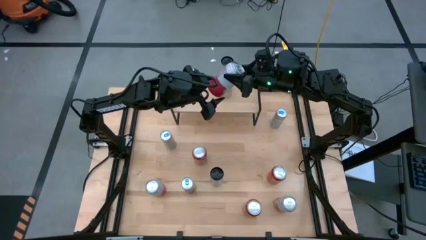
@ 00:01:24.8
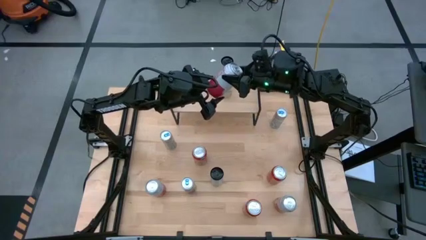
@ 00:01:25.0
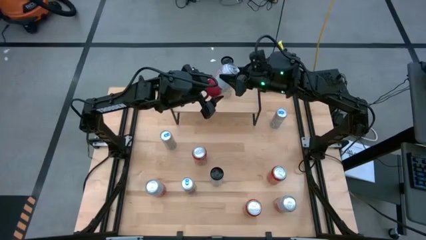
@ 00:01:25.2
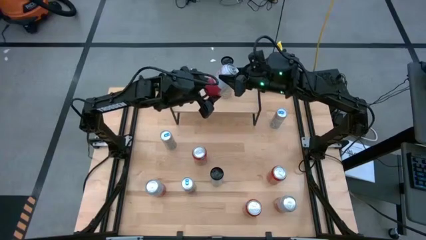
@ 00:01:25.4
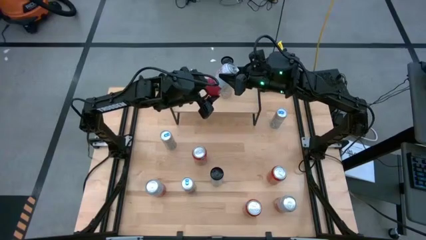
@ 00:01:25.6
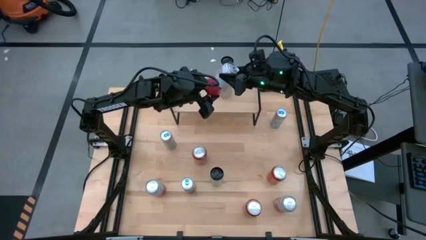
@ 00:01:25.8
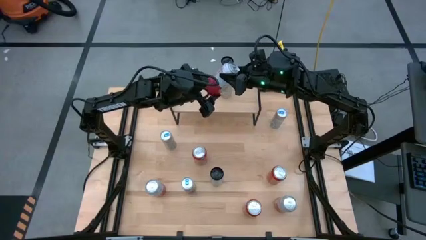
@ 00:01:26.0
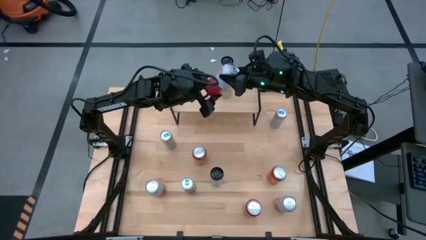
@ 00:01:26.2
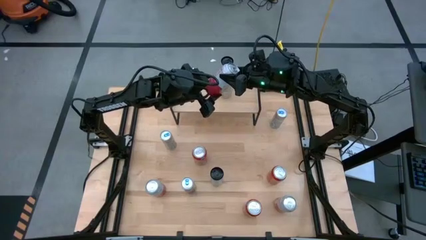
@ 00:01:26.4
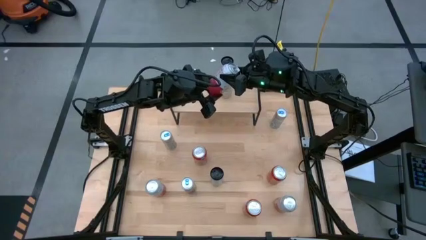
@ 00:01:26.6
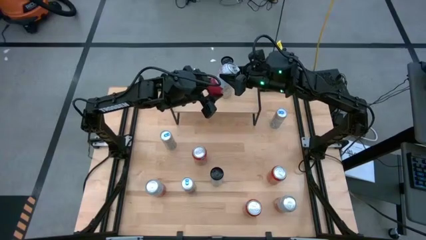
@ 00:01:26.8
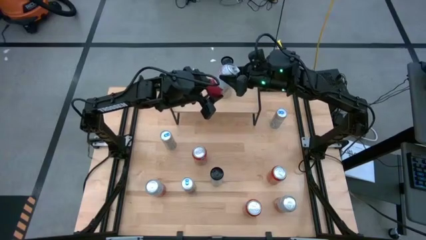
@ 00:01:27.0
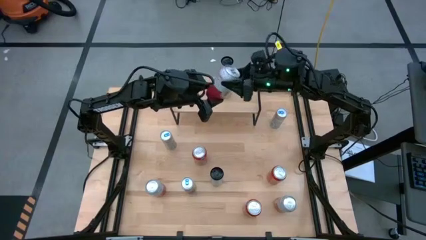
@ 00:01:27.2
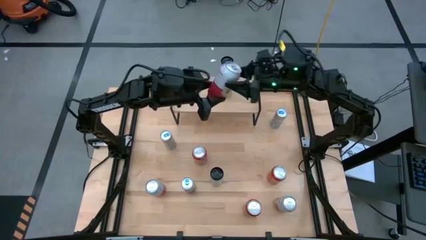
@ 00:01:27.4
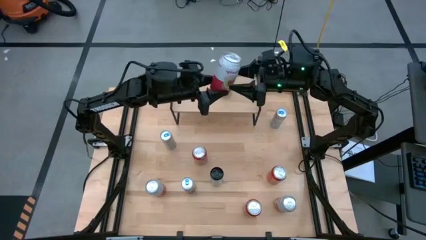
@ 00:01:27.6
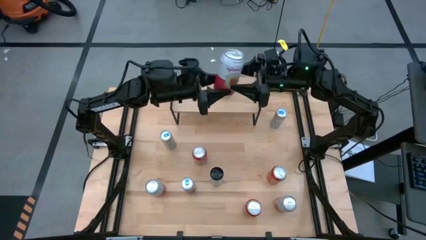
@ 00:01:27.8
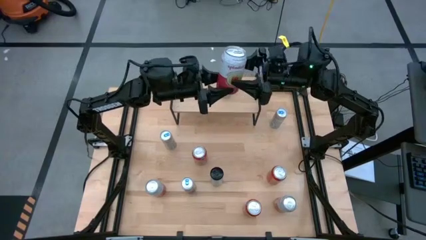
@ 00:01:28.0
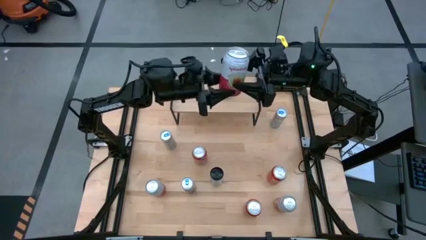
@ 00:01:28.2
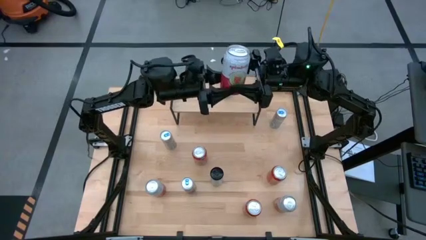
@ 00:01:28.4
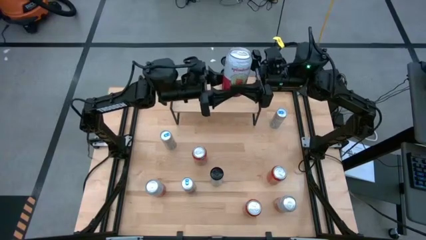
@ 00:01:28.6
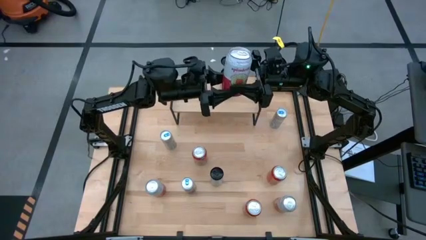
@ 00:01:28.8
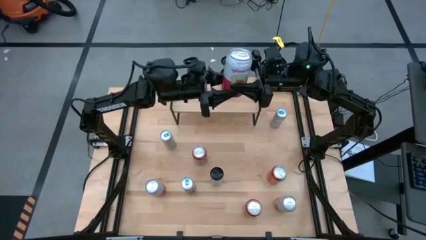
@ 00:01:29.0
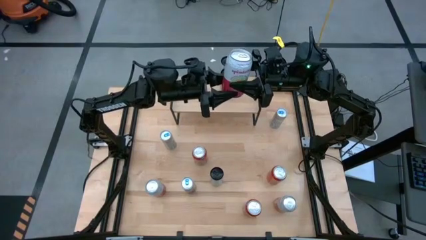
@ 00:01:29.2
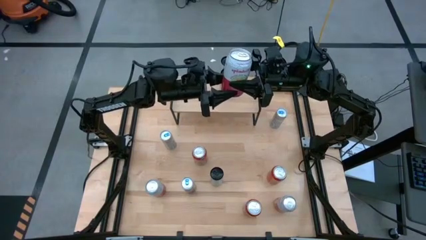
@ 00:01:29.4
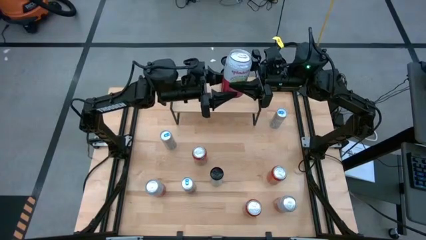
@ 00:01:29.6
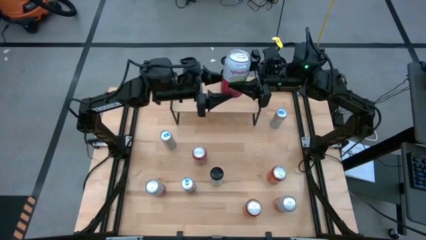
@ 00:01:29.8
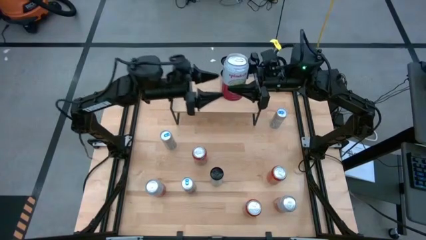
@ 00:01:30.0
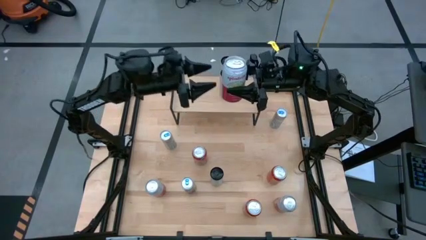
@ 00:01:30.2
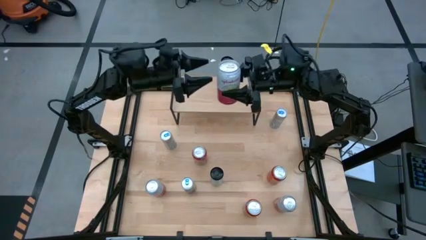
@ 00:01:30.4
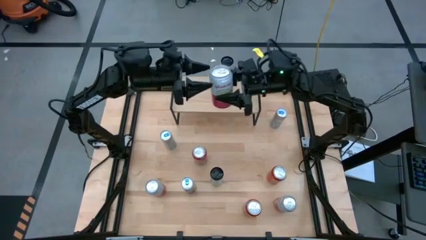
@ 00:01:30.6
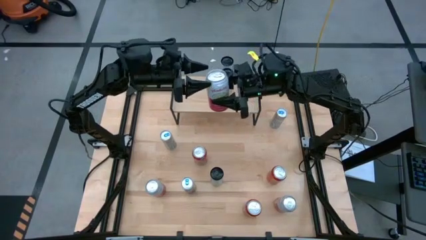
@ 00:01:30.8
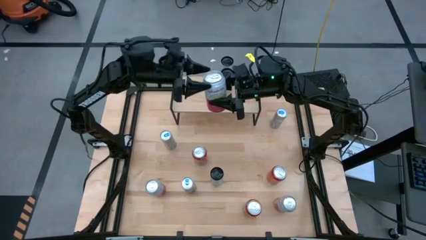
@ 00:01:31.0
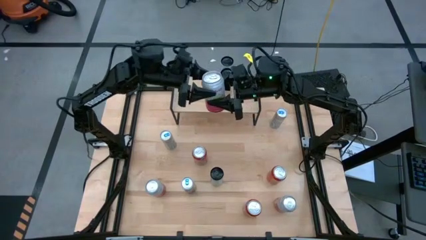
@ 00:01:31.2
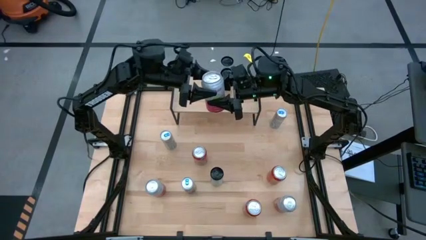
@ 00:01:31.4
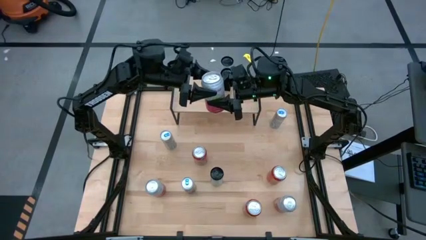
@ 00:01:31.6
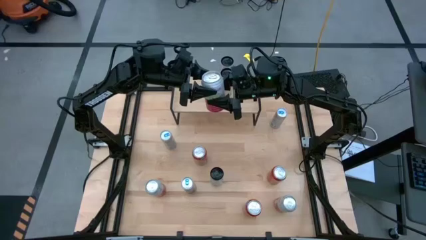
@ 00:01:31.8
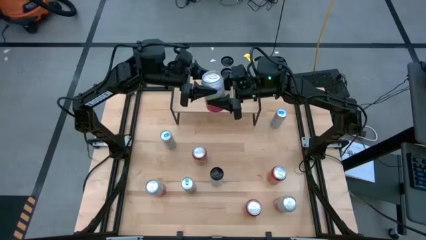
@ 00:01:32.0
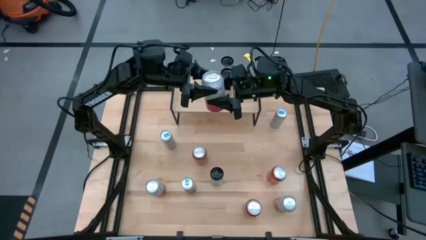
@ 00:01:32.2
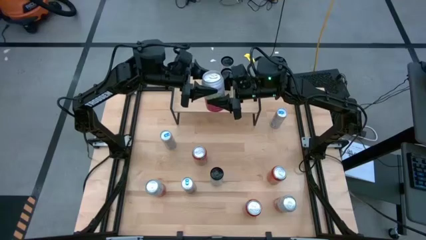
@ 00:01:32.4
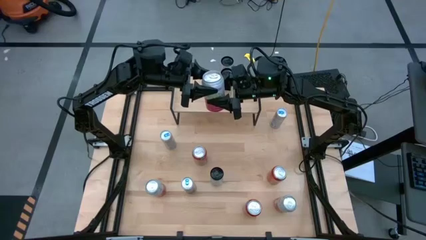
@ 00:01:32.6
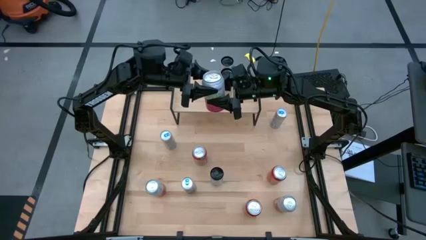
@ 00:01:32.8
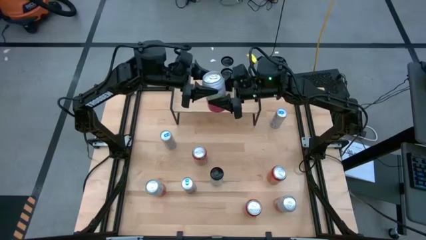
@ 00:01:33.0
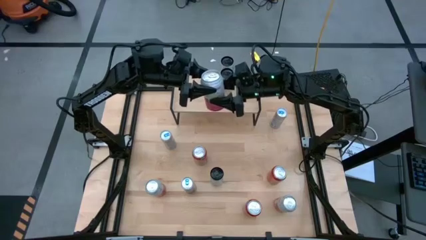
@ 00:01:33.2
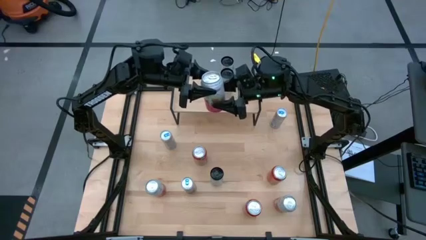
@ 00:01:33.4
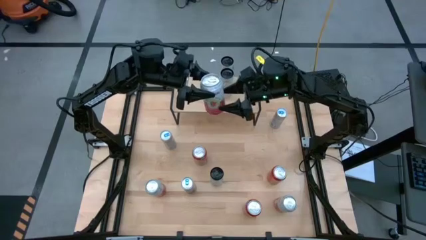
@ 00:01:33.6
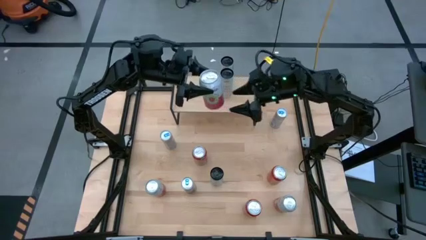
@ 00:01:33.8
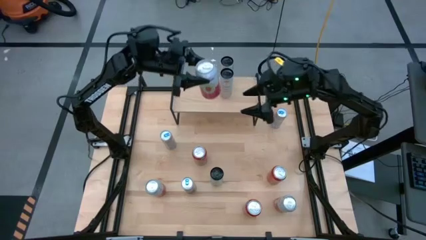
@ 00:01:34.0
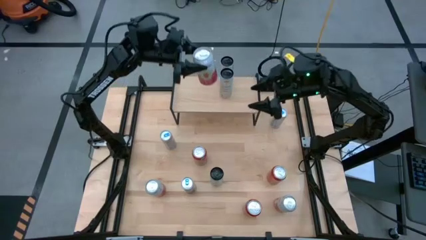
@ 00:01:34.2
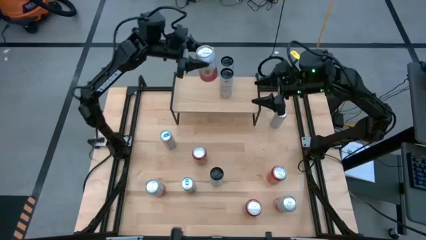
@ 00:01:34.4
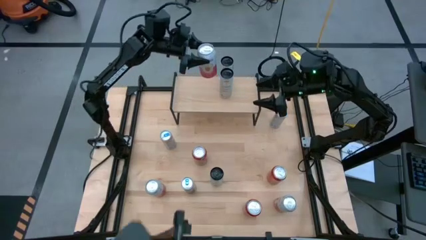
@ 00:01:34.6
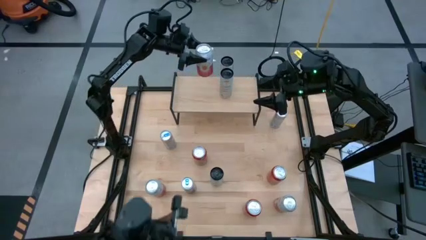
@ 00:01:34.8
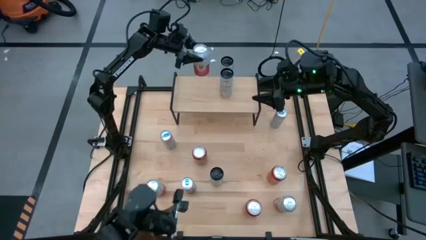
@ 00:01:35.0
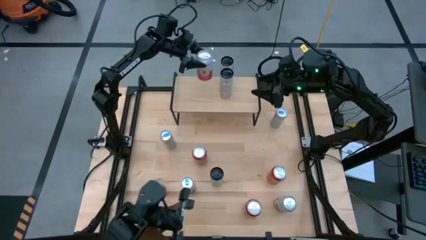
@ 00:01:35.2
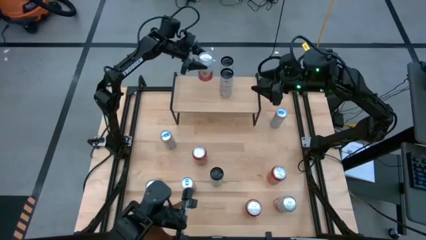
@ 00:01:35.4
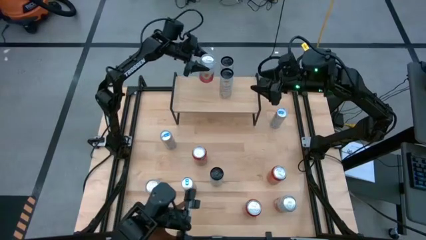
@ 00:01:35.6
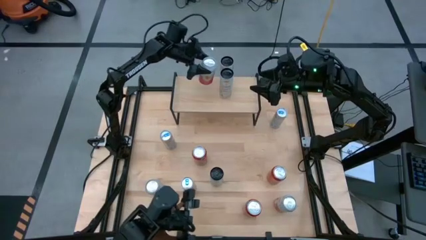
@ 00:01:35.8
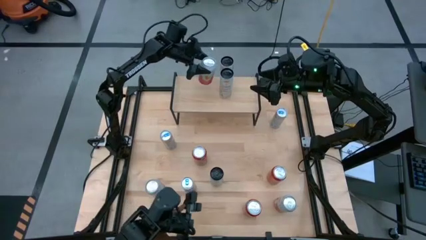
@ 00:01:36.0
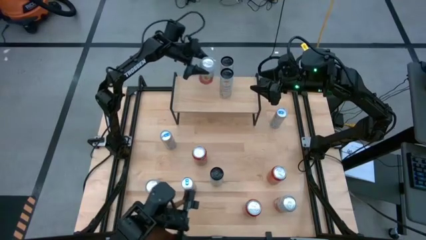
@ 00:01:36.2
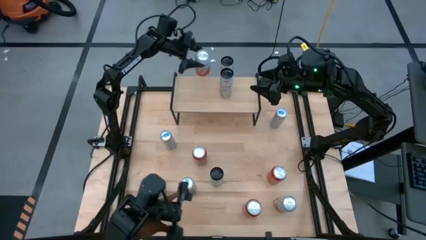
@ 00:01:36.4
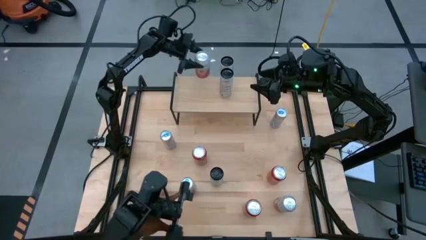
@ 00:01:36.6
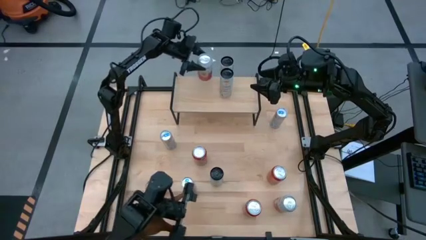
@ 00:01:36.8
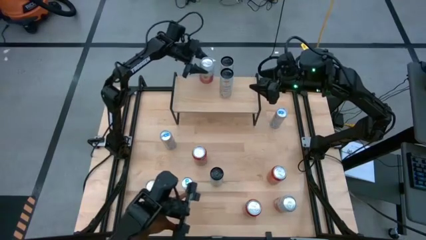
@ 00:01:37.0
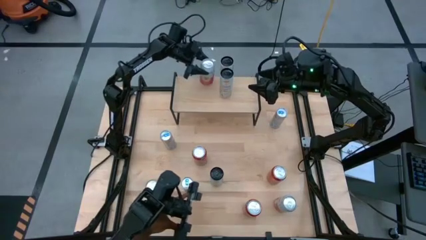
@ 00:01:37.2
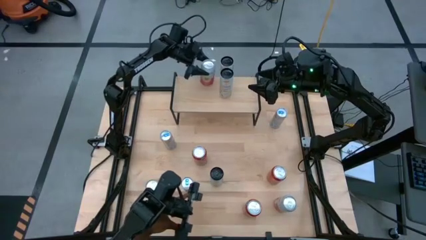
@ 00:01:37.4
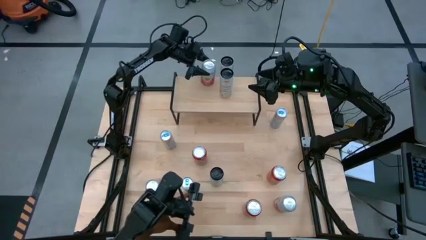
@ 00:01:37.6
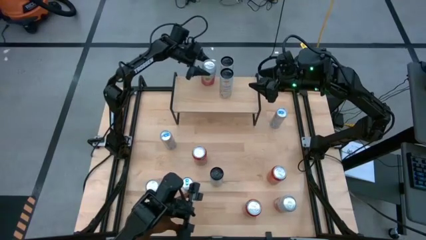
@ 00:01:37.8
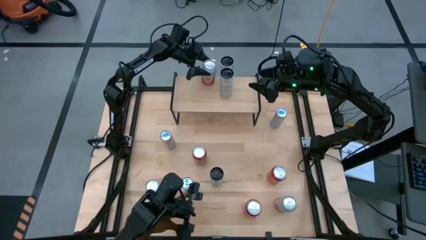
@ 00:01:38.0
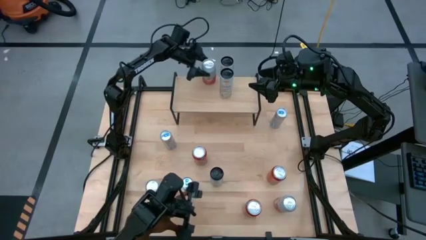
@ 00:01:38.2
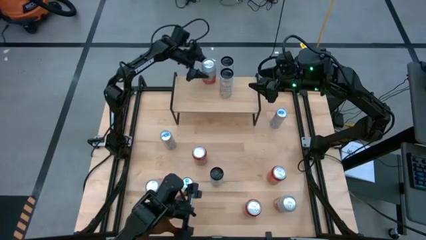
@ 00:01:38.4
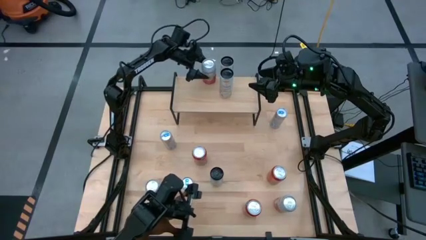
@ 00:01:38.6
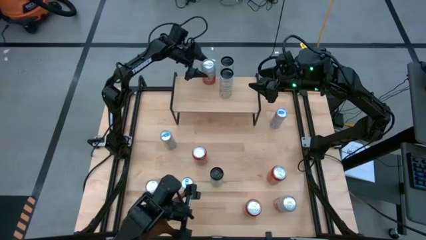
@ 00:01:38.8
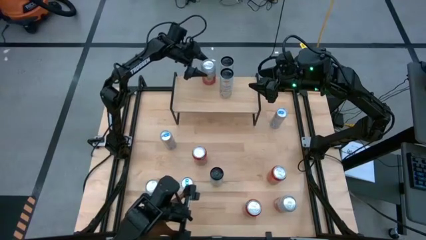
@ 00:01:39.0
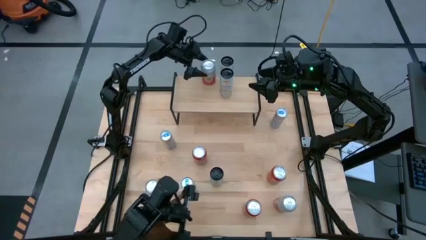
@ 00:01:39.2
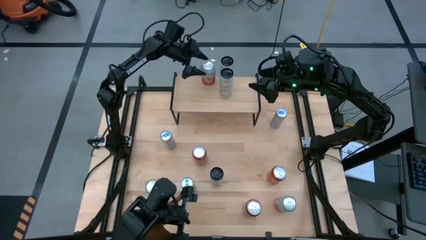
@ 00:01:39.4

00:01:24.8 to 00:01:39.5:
Task: Place canned beverage on shelf
Put the middle pink-white soda can on the shelf
